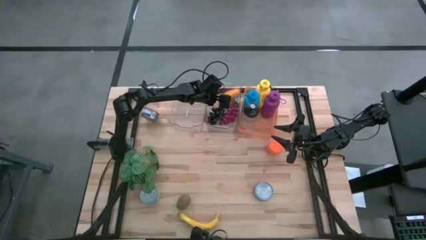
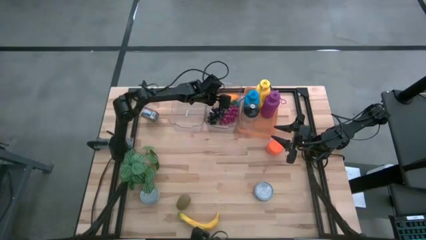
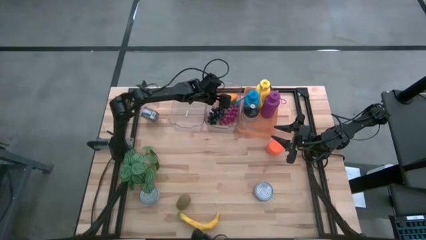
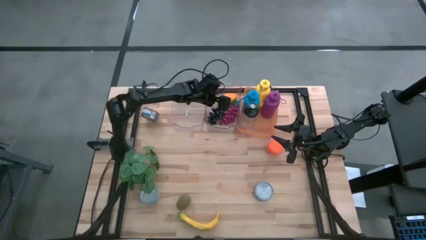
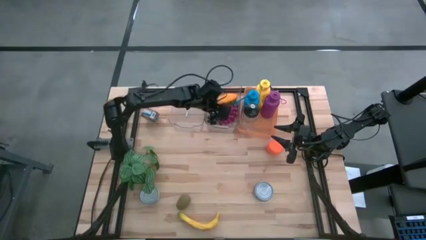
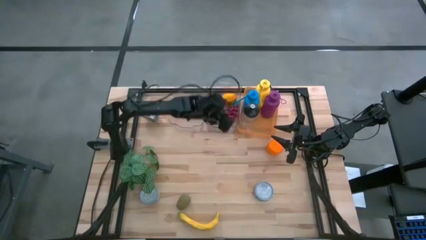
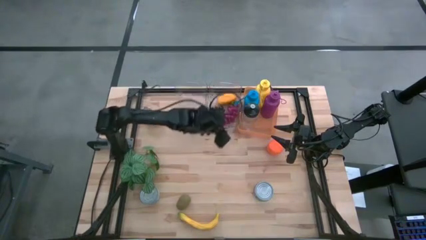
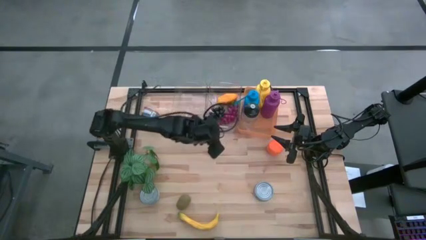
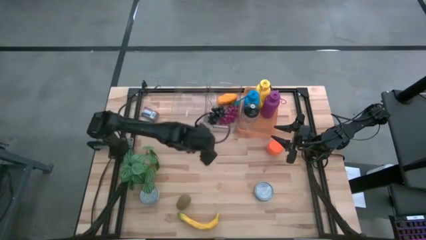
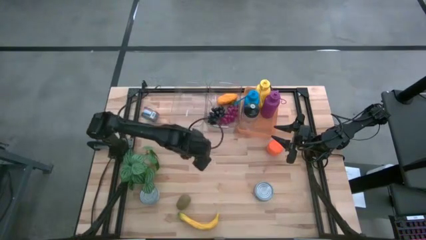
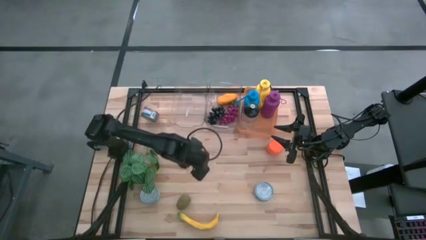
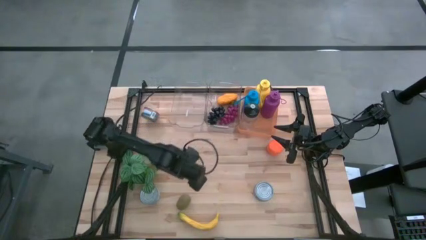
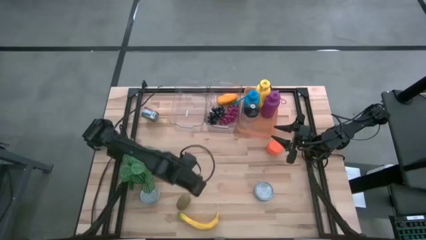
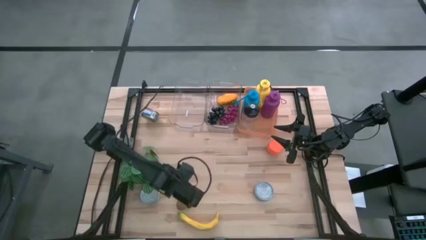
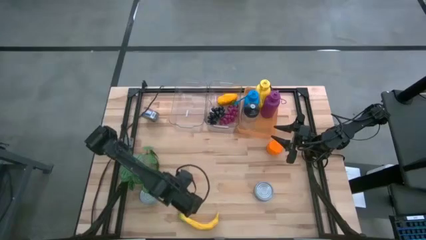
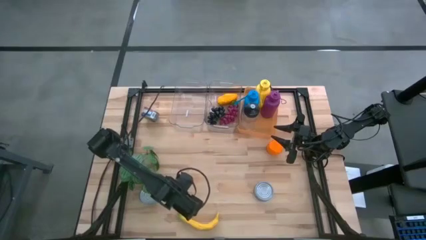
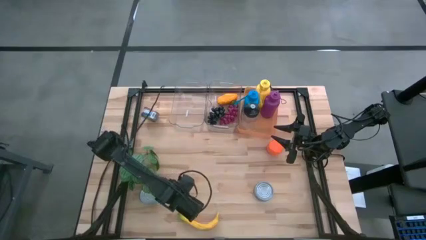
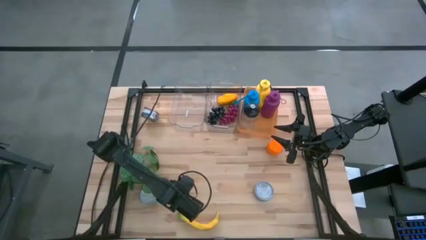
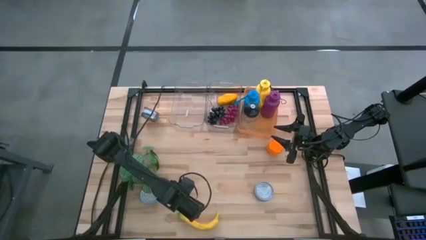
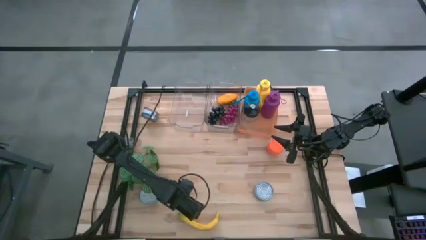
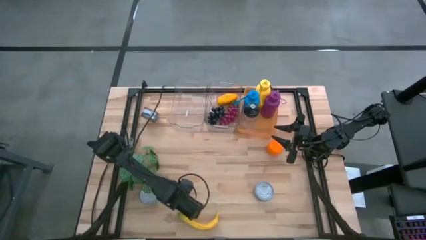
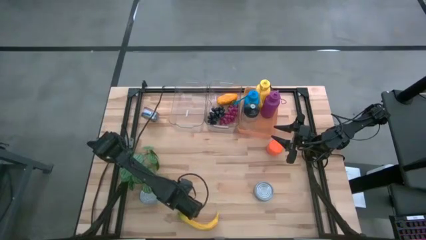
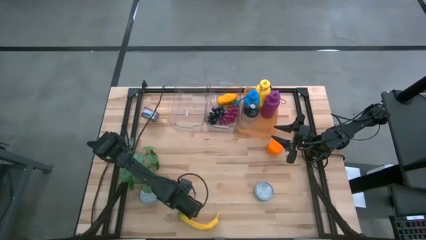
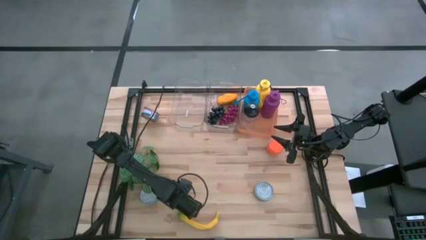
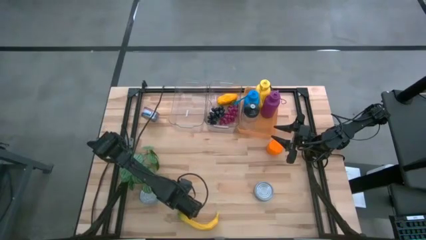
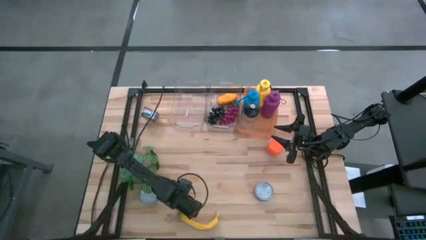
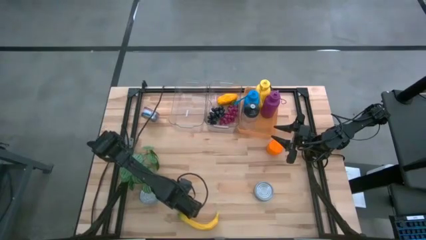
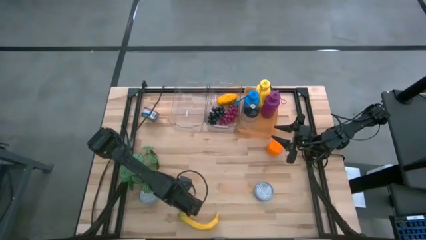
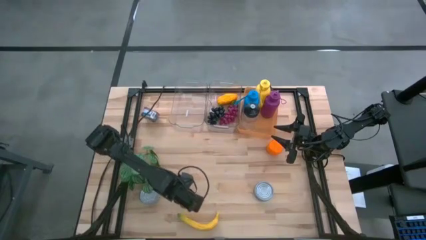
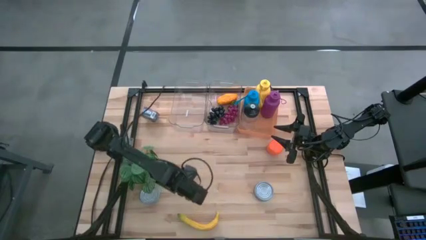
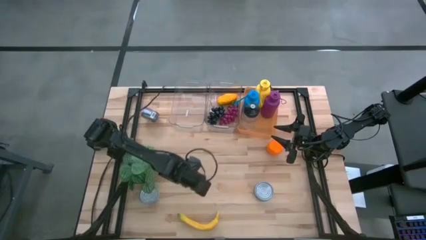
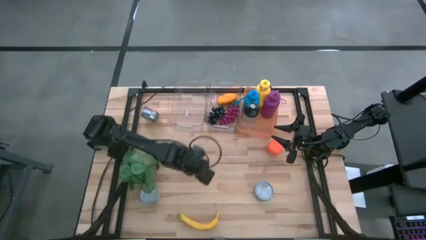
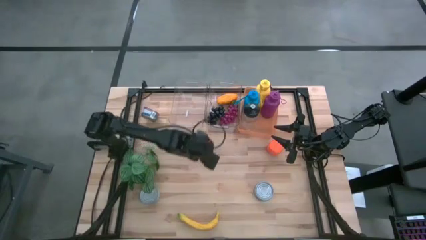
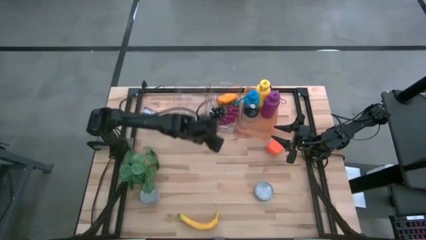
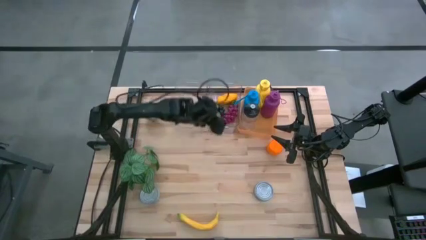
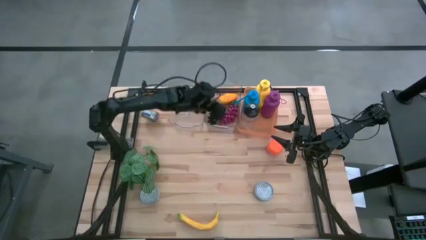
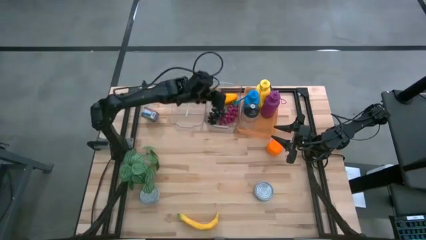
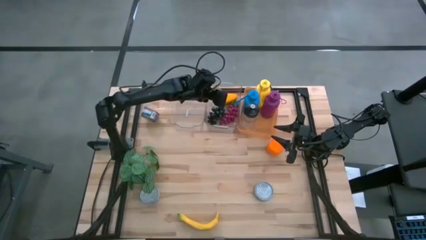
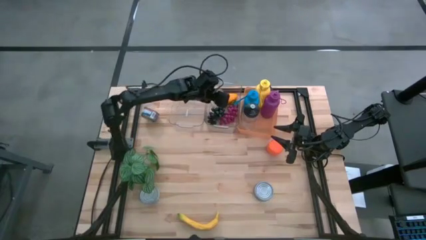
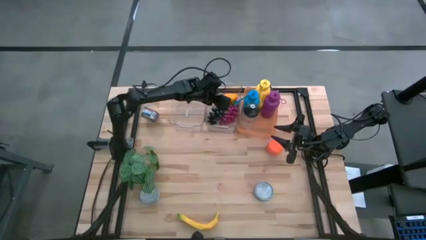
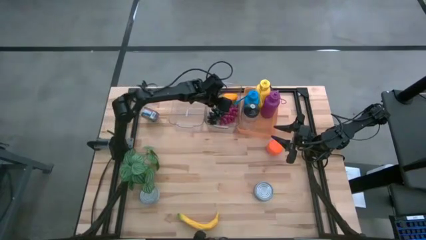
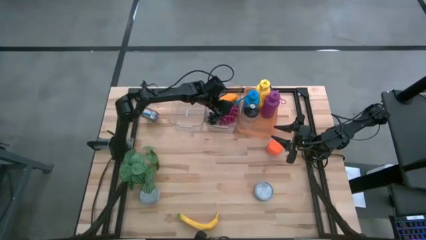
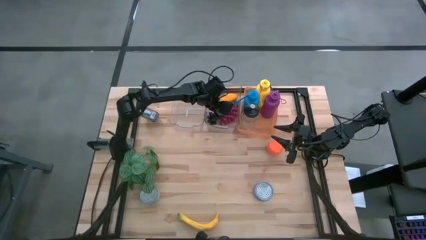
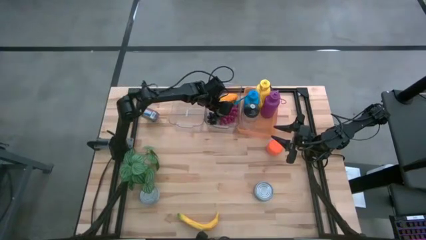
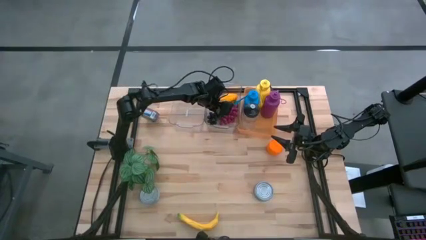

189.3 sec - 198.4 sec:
Task: Pick & Place Food Item
Put the brown kiwi into the right transparent bin
